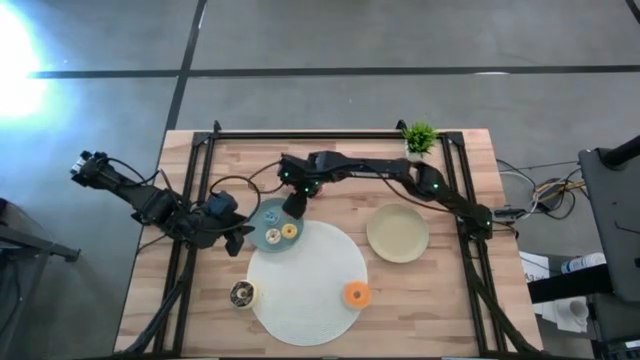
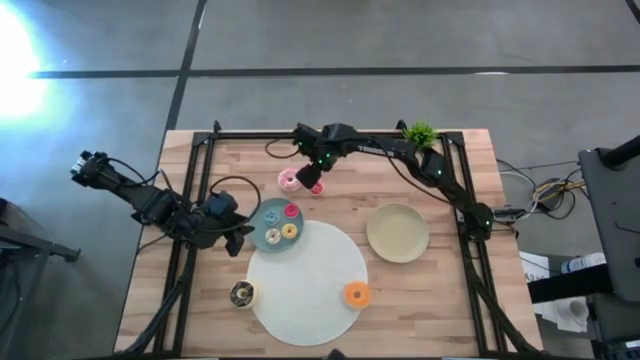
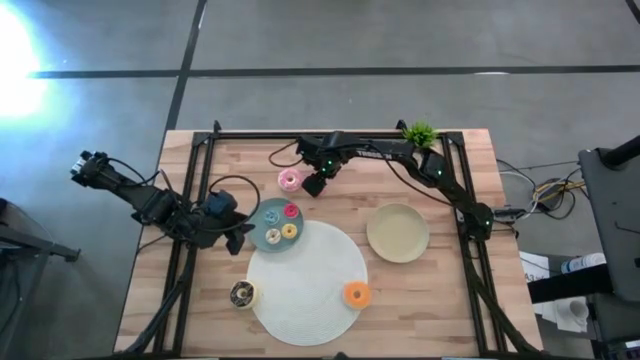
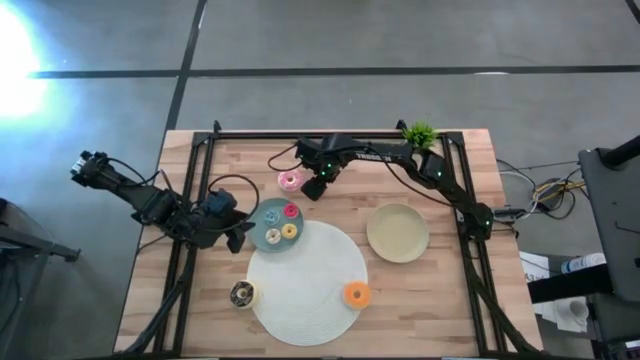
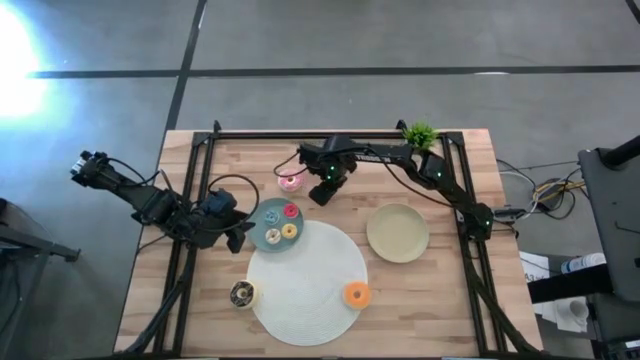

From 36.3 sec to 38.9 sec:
Task: Pick & Place donuts
Put the small dark orange donut on the blue plate

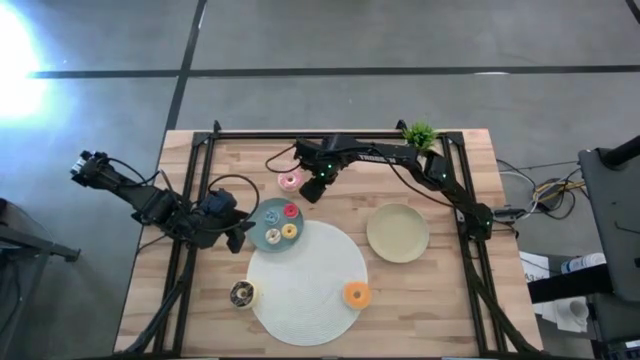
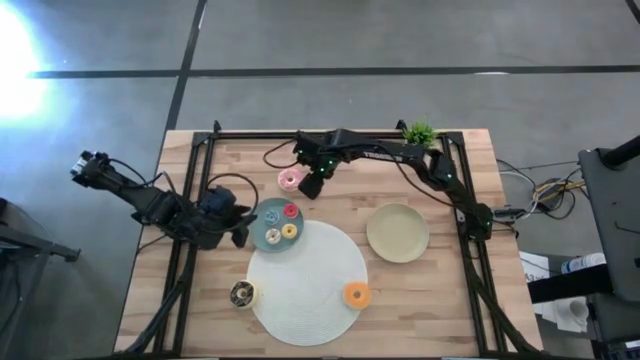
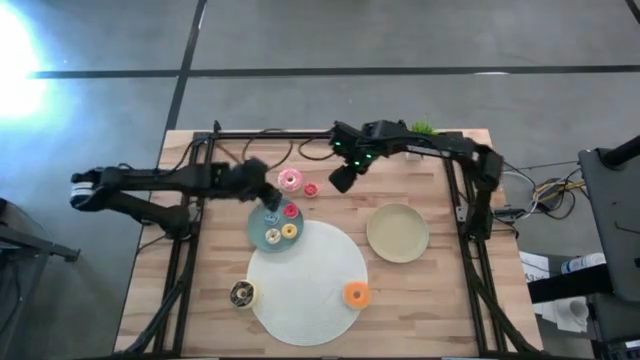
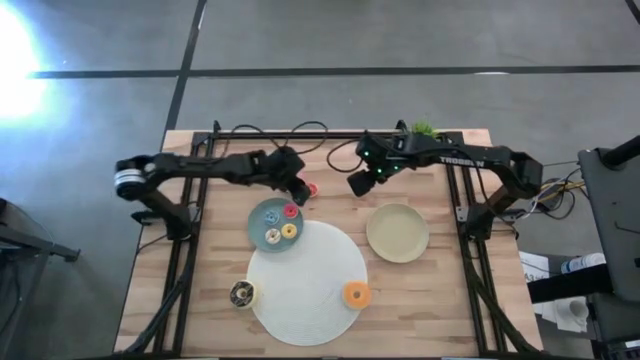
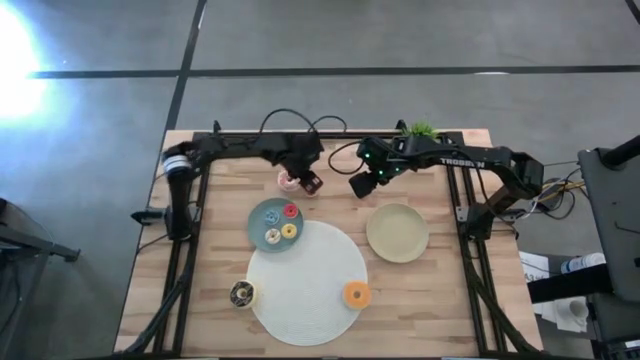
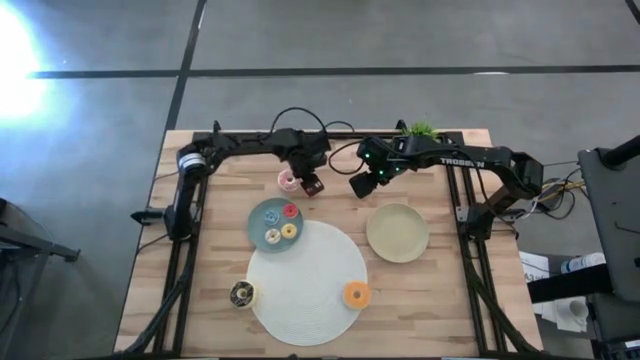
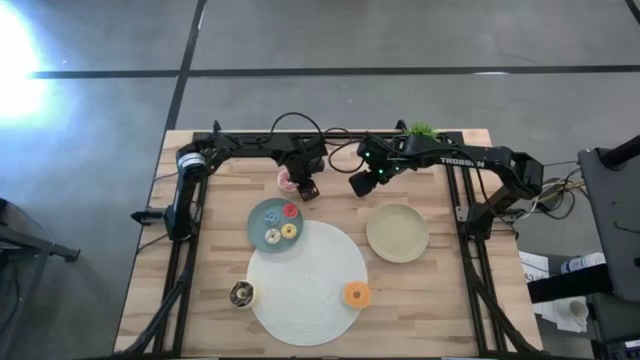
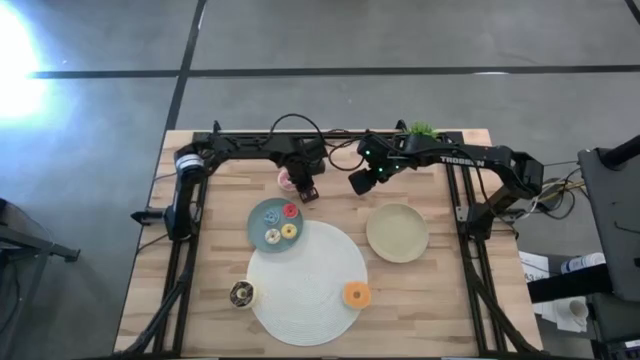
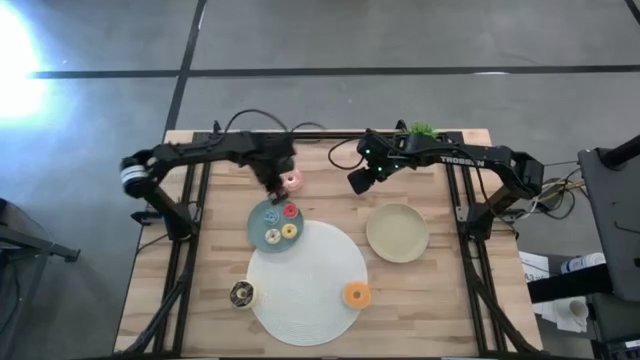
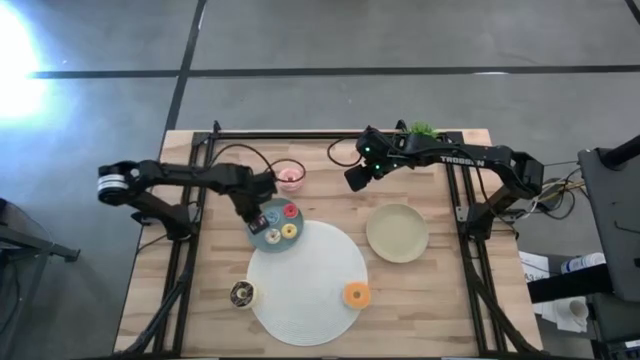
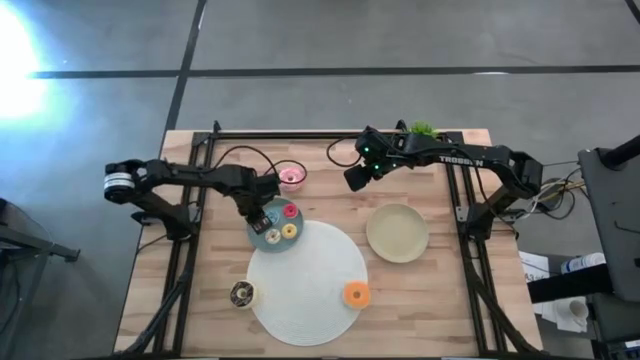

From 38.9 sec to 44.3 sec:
Put the small dark orange donut on the blue plate

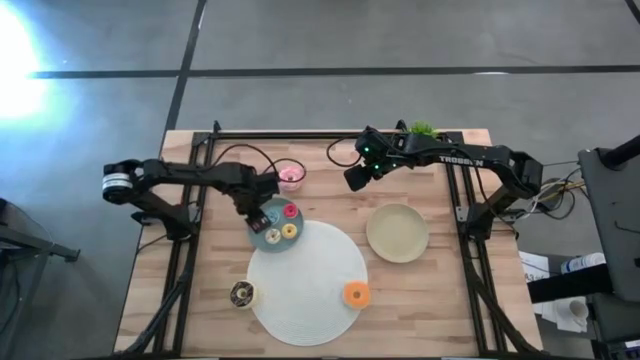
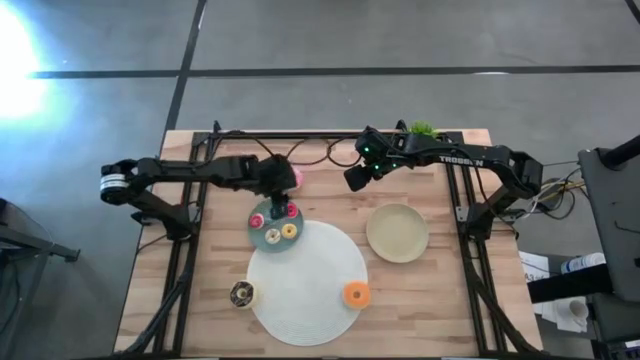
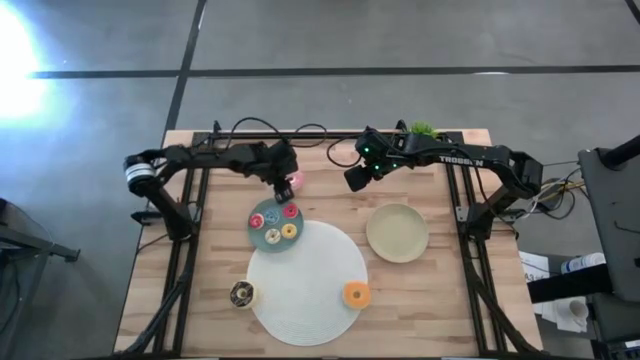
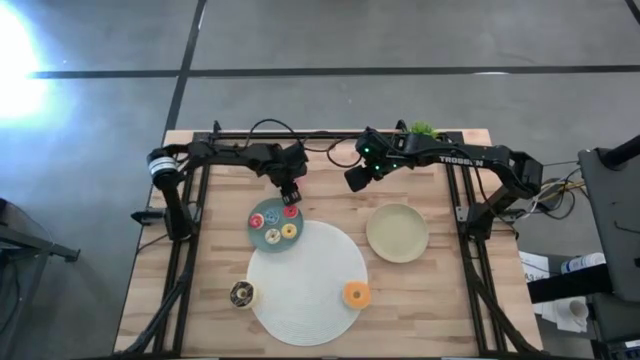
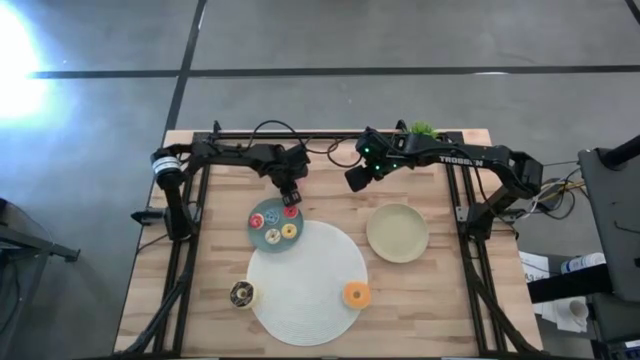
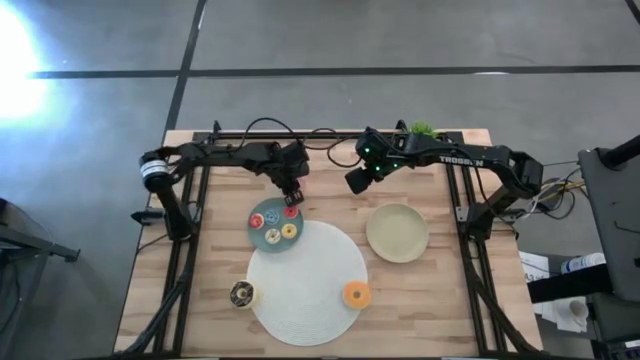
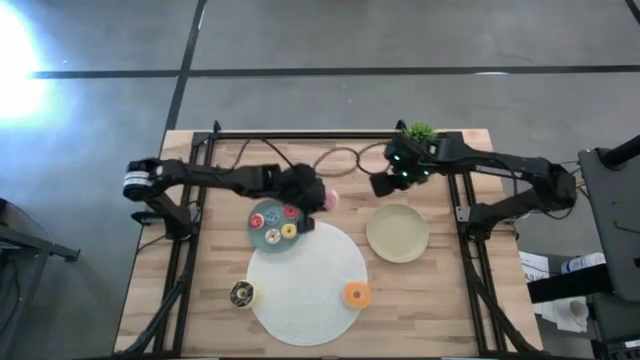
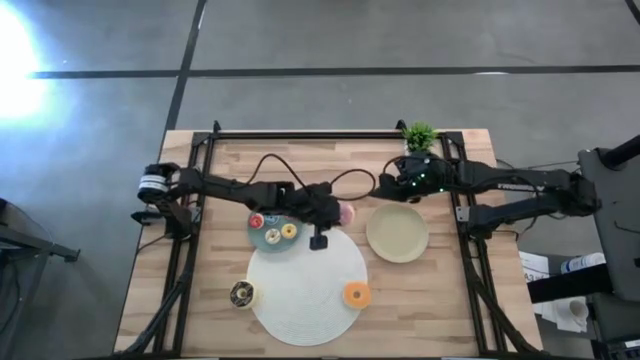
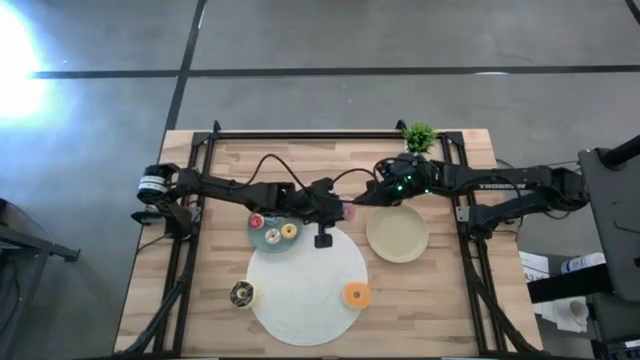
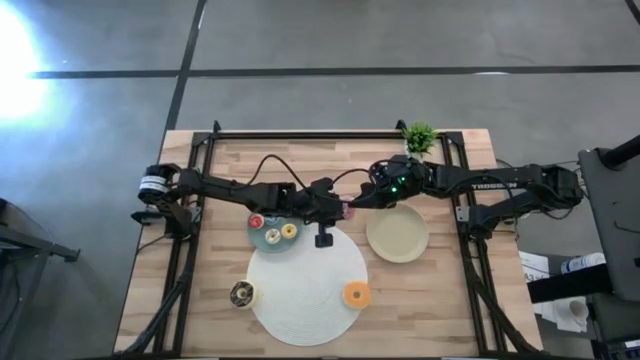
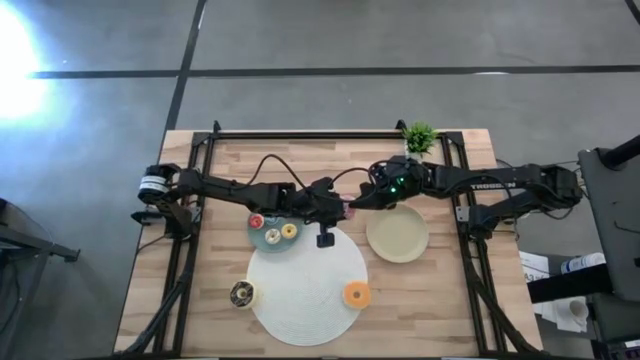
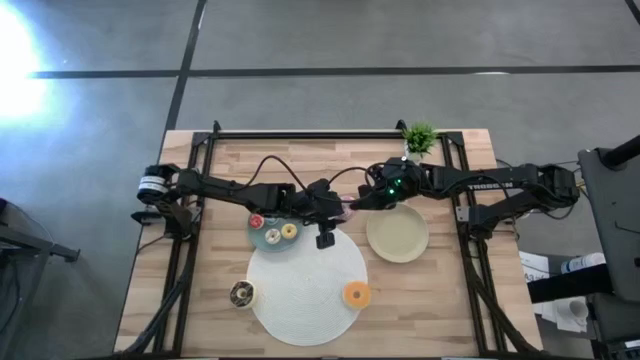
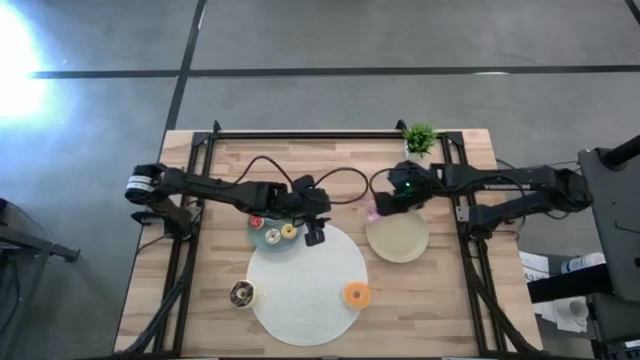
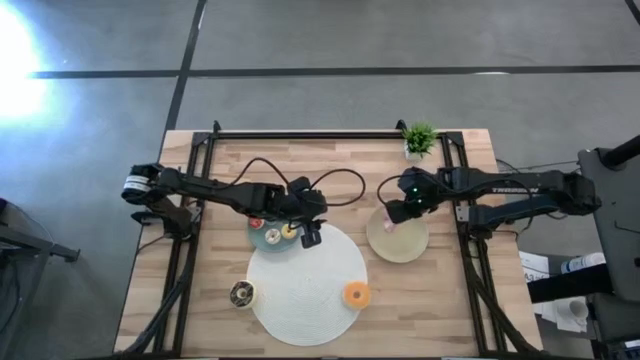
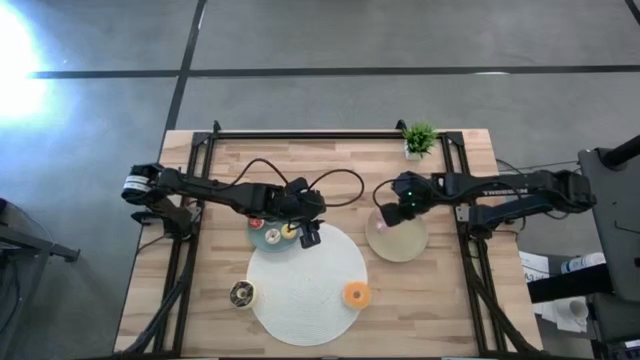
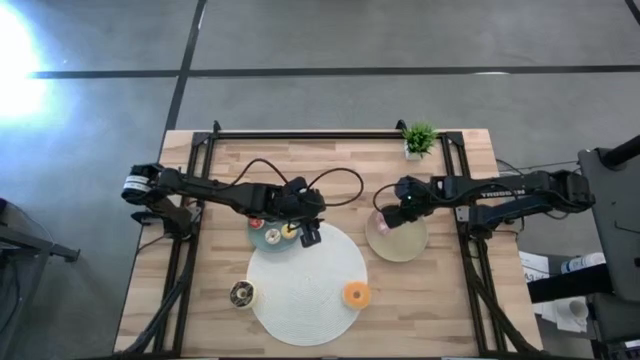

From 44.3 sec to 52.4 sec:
Put the big pink donut on the brown plate

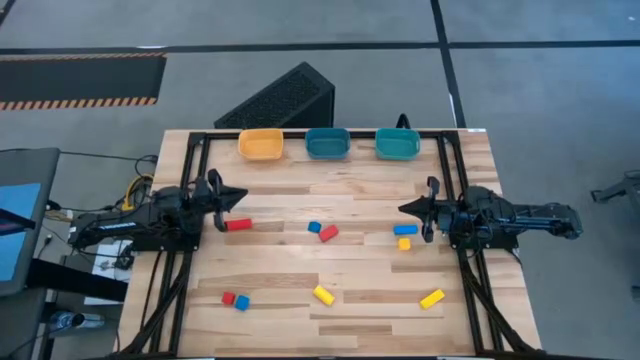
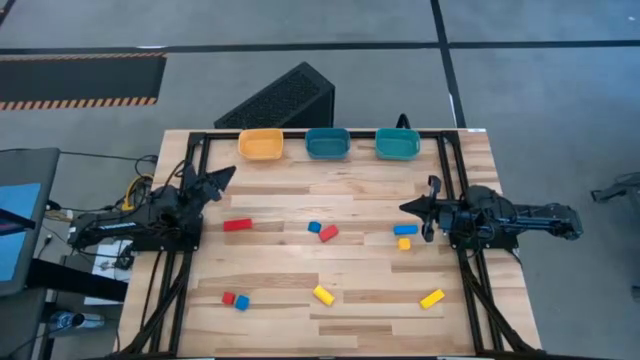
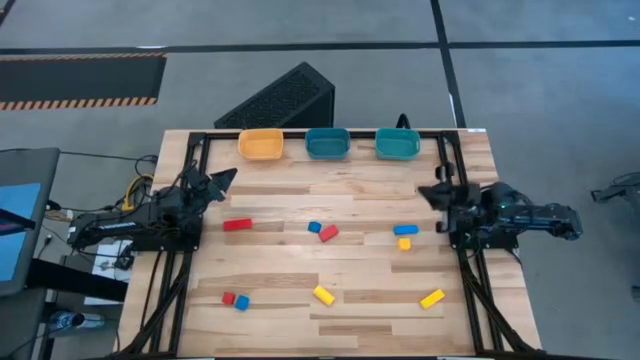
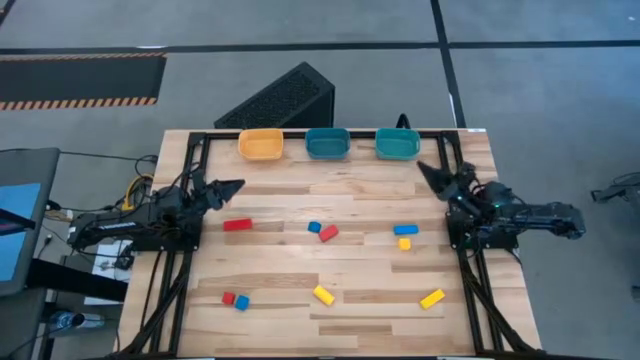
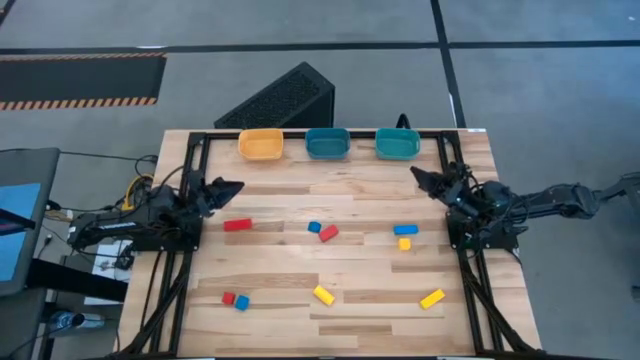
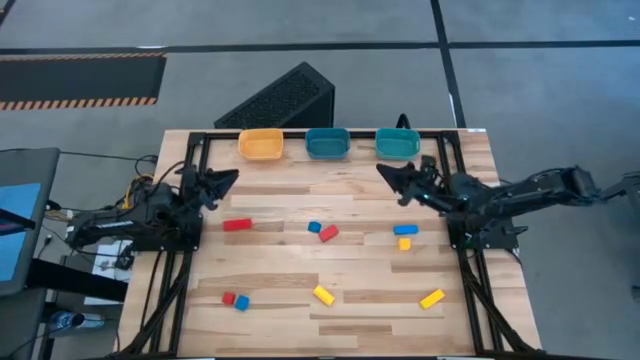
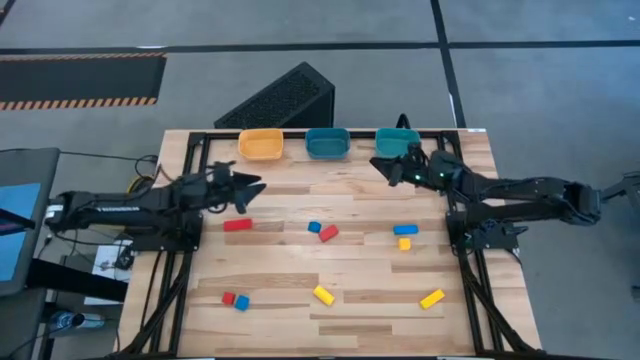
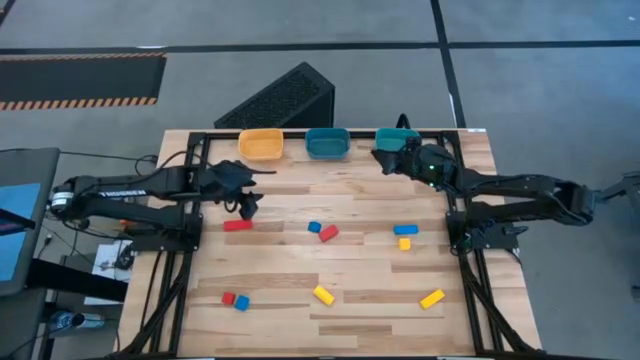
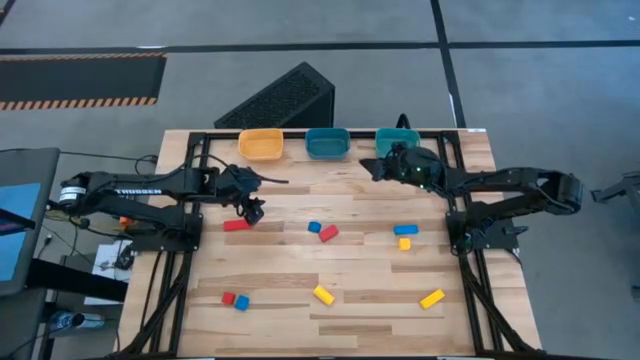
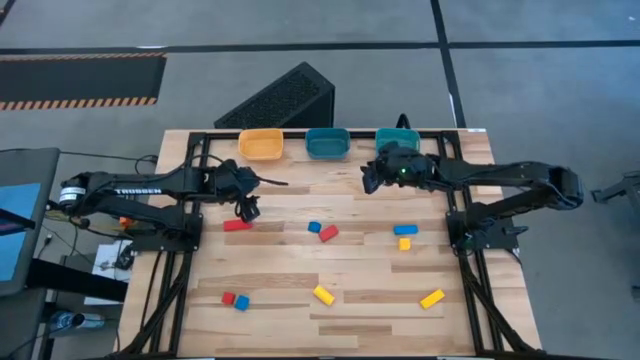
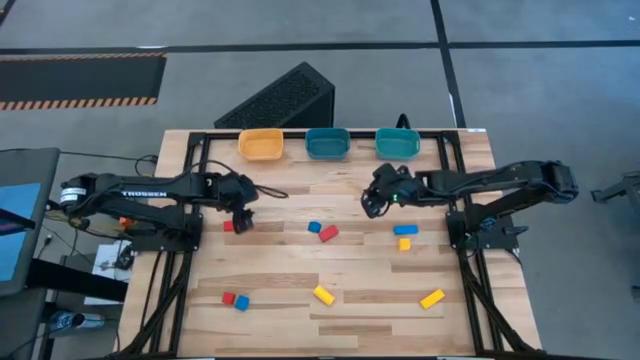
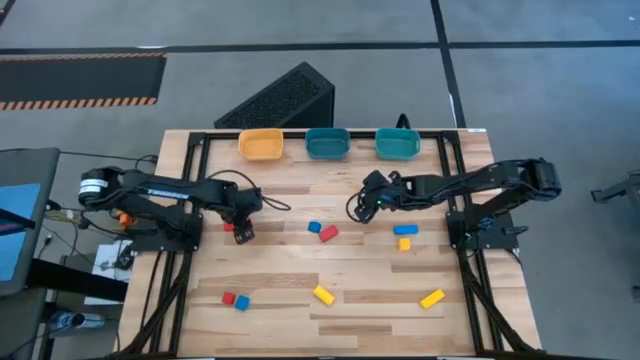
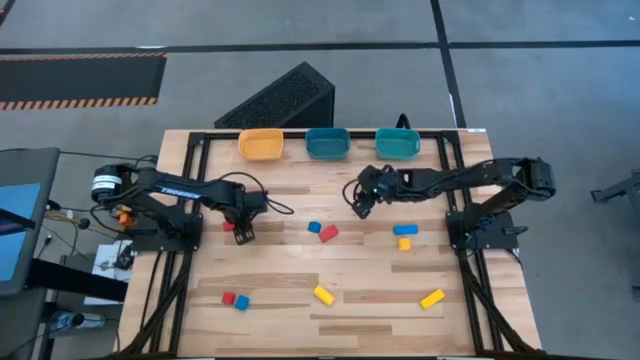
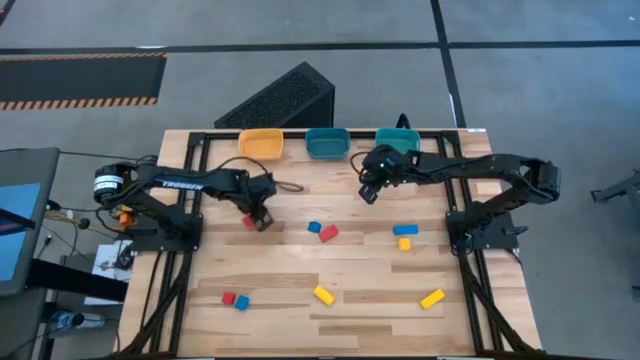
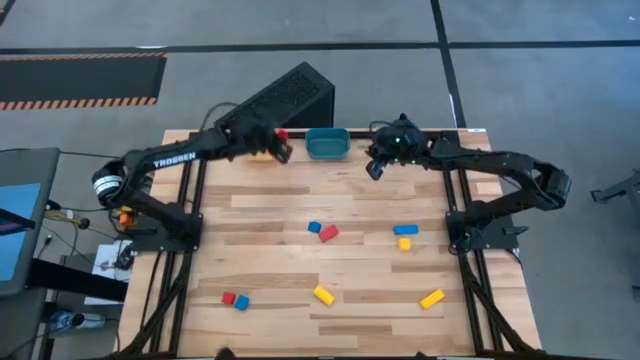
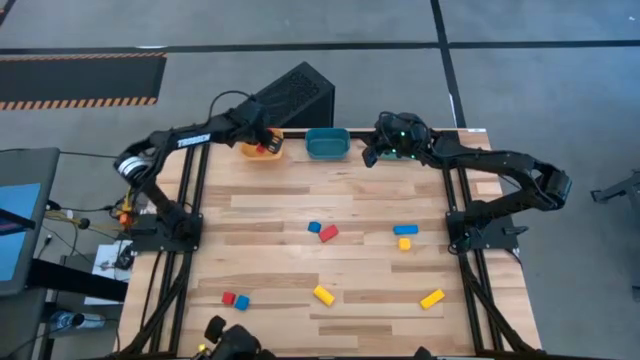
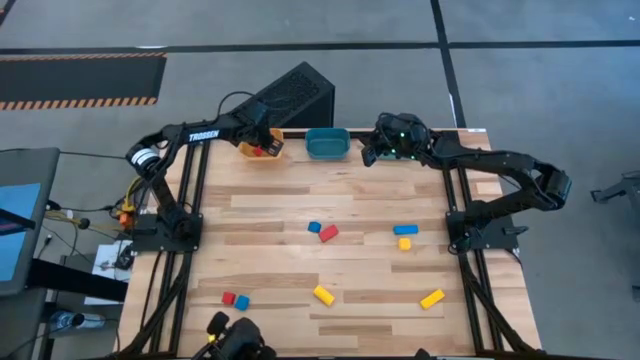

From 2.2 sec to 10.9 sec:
Task: Sort & place blocks by color
Put the top left red block into the yellow container
